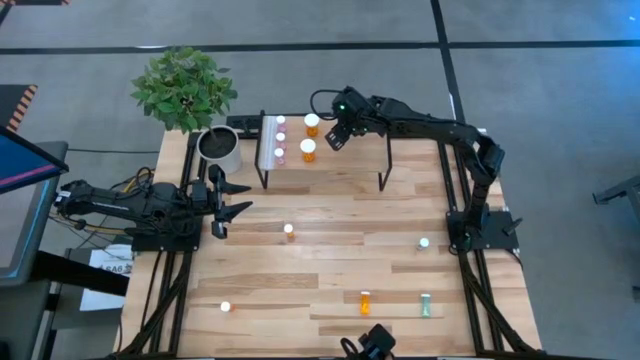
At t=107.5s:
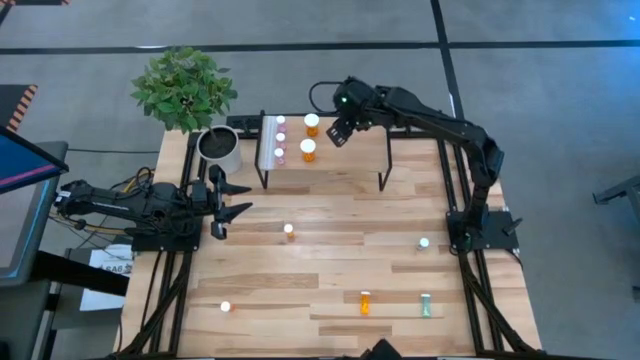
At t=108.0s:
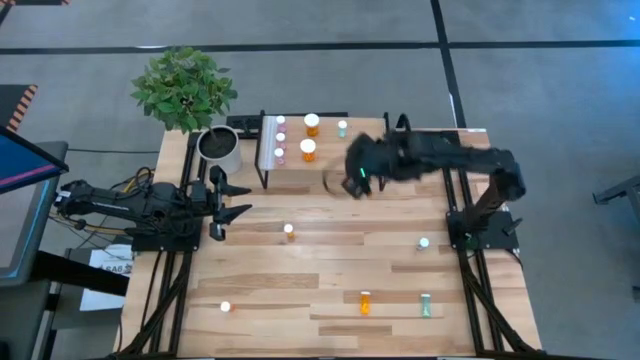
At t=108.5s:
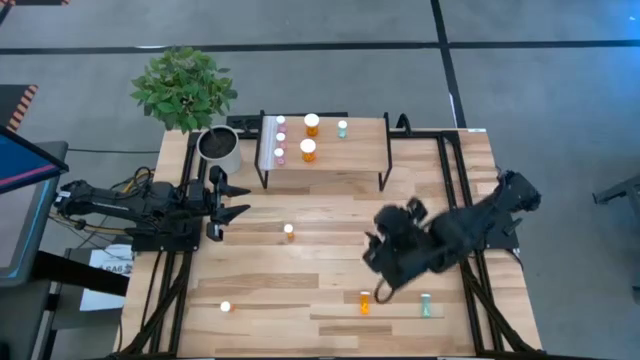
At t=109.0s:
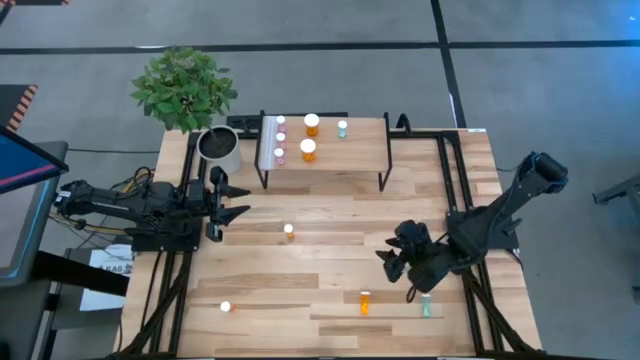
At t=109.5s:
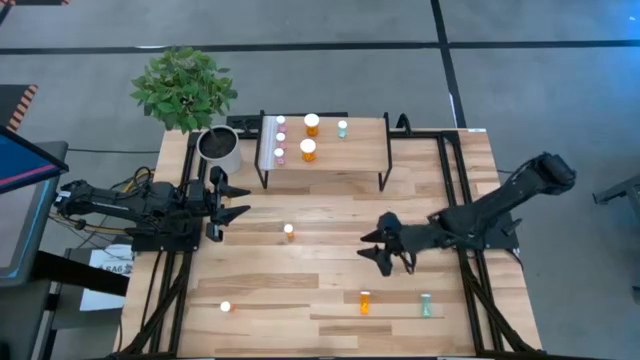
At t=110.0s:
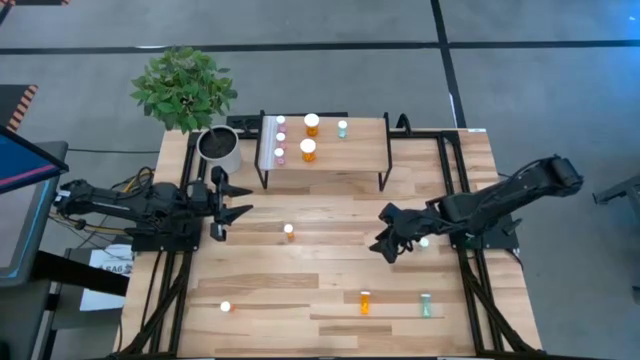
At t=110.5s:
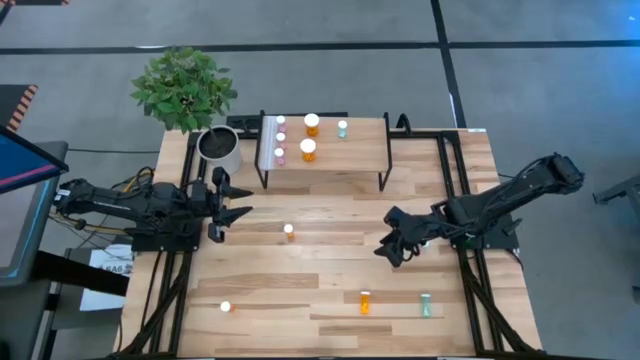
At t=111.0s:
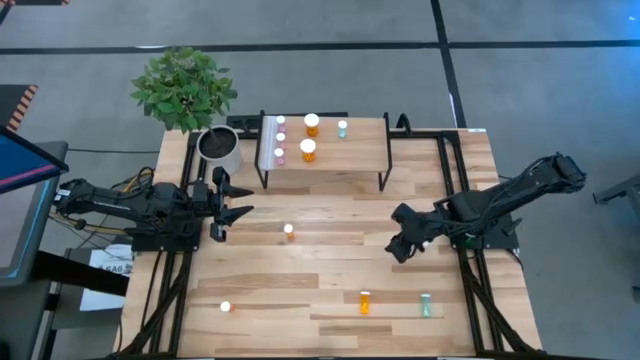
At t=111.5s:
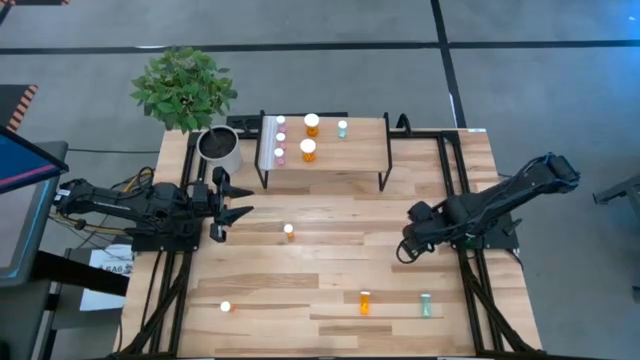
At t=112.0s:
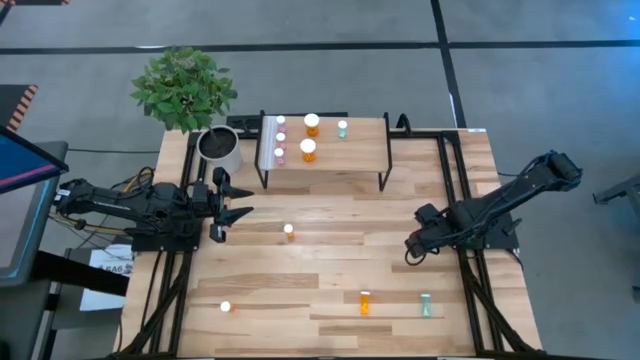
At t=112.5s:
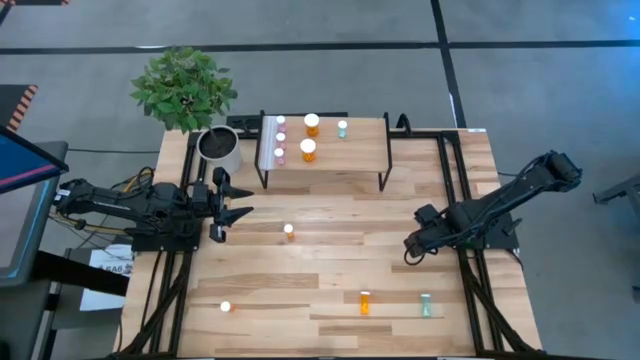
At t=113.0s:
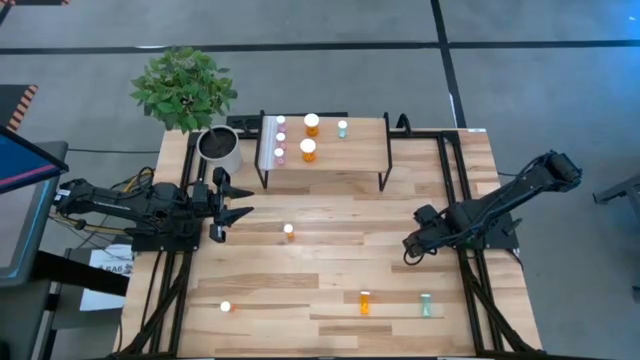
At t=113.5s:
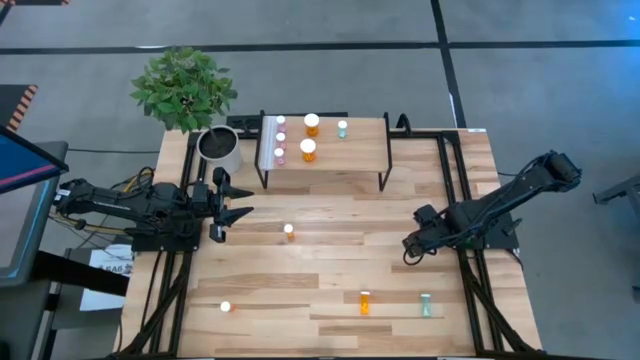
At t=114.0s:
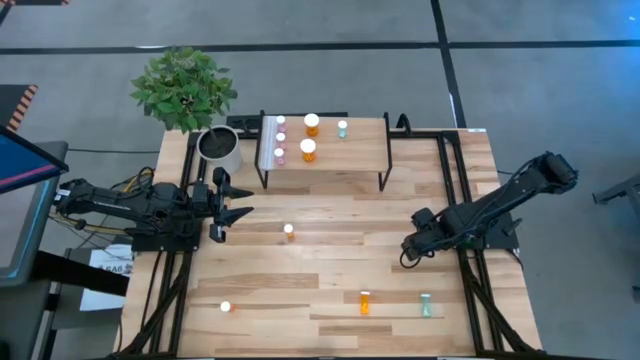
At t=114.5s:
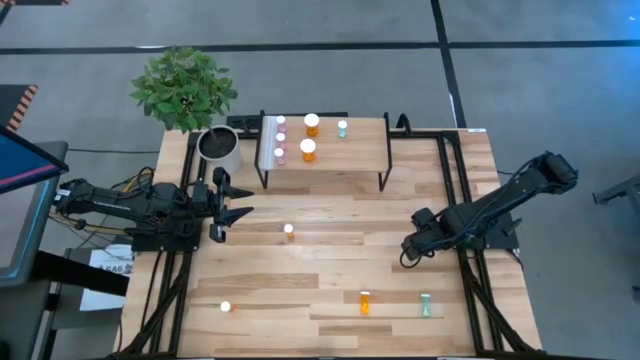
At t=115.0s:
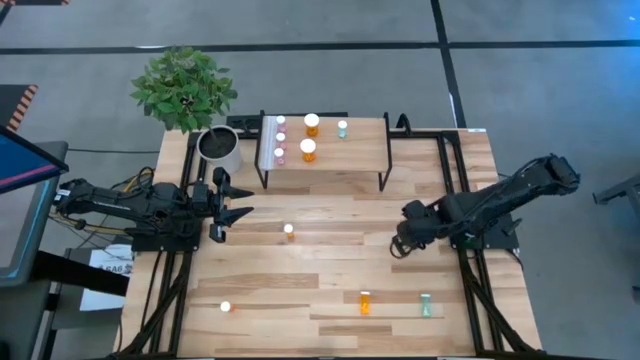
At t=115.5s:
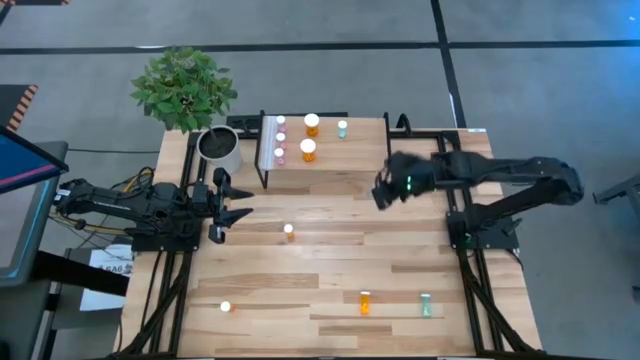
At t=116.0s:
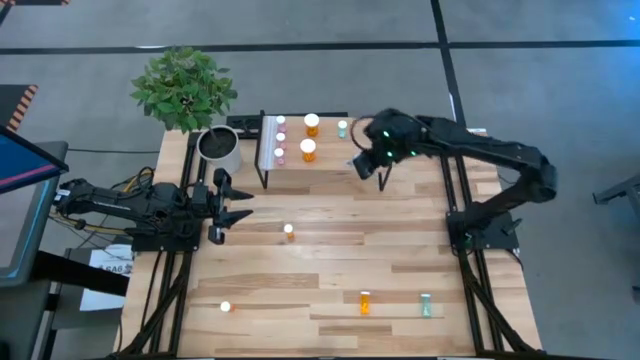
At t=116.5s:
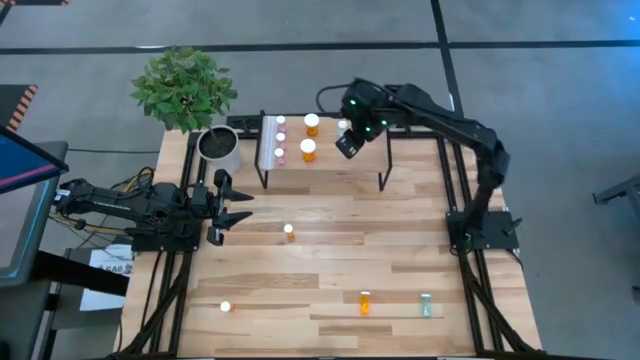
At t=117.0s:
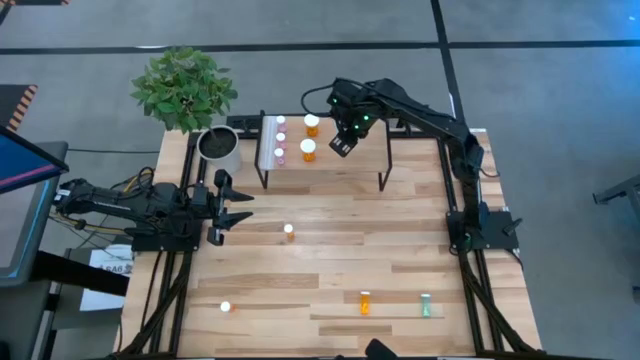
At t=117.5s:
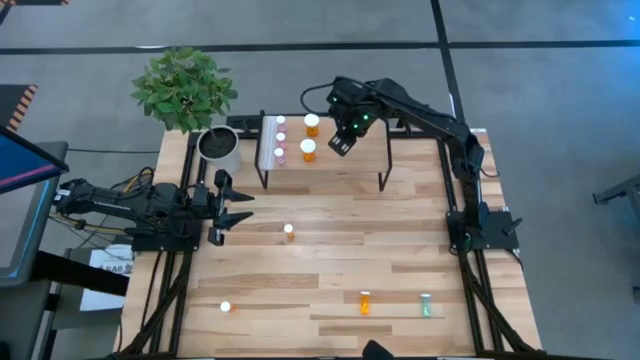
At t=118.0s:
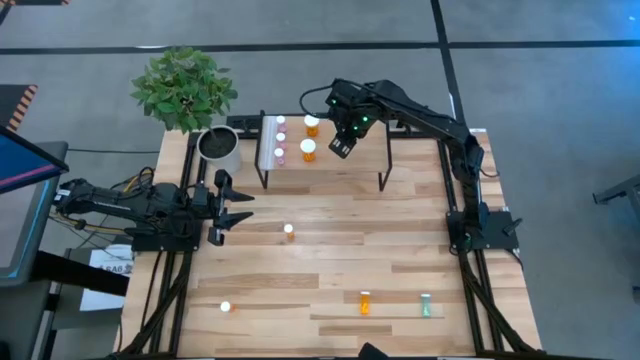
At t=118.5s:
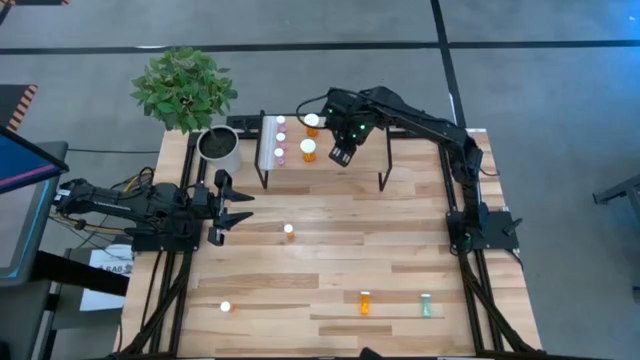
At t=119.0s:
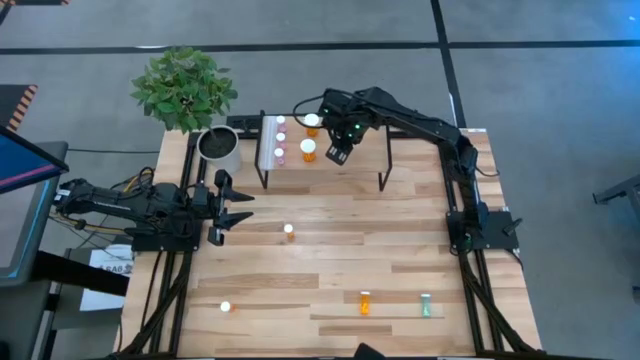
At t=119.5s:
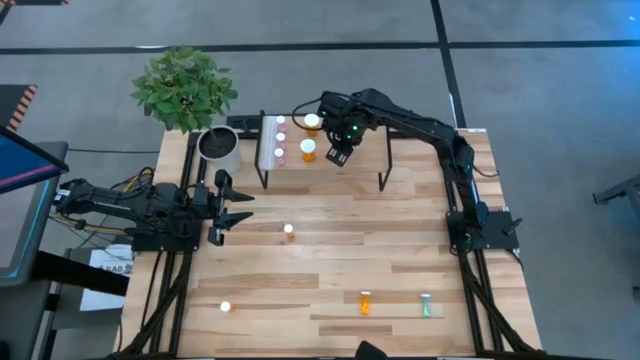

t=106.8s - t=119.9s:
Task: Pick and place medicine bottles onto shelf by color
Put the top green pill bottle on the shelf aligned with the other green pill bottle

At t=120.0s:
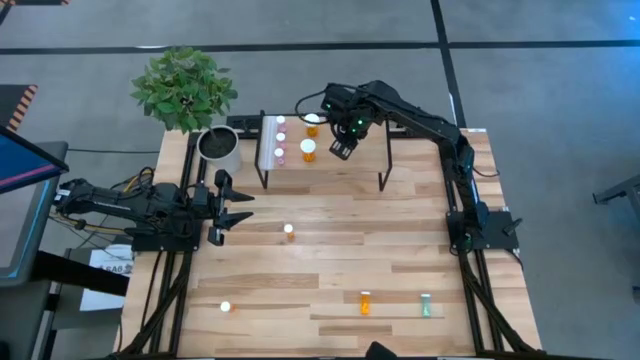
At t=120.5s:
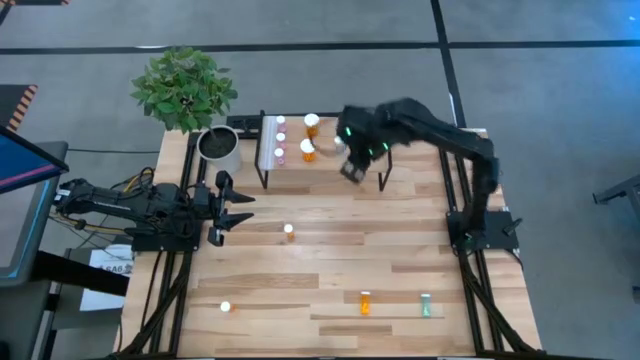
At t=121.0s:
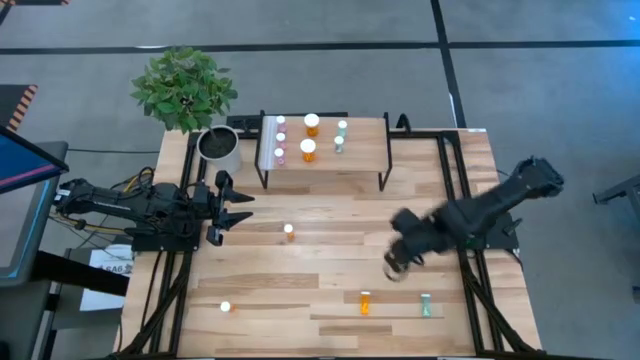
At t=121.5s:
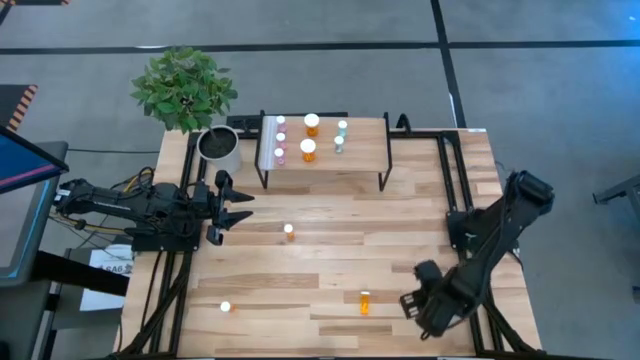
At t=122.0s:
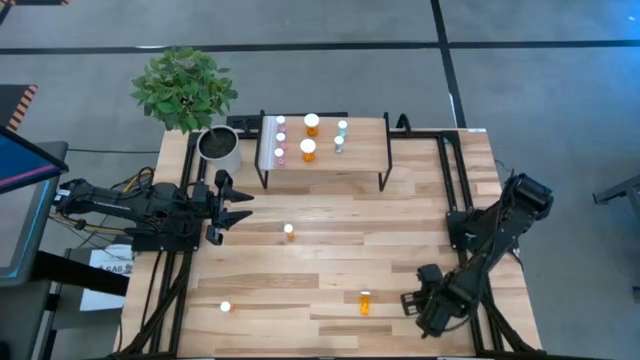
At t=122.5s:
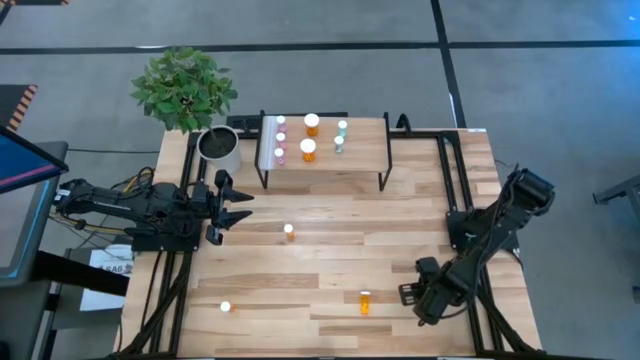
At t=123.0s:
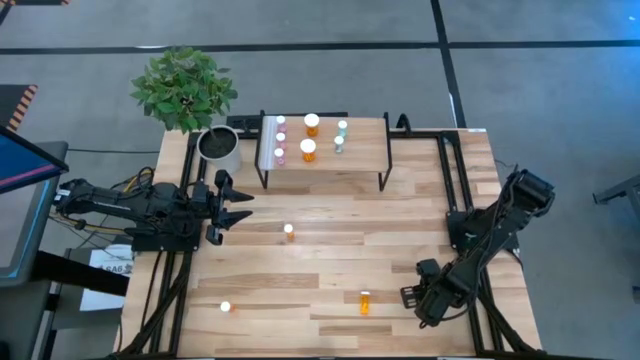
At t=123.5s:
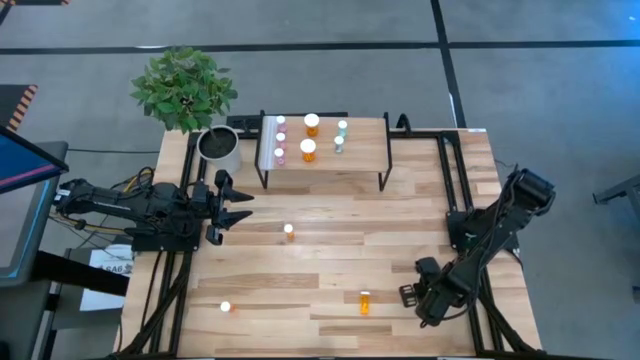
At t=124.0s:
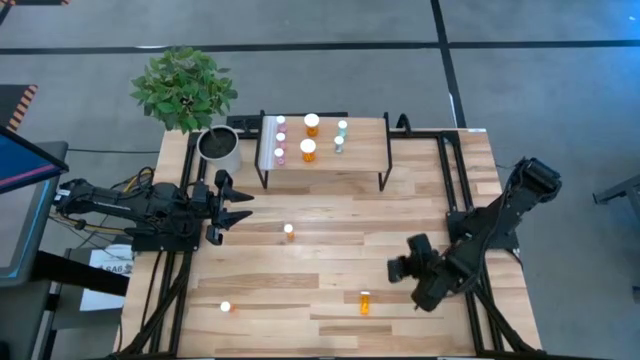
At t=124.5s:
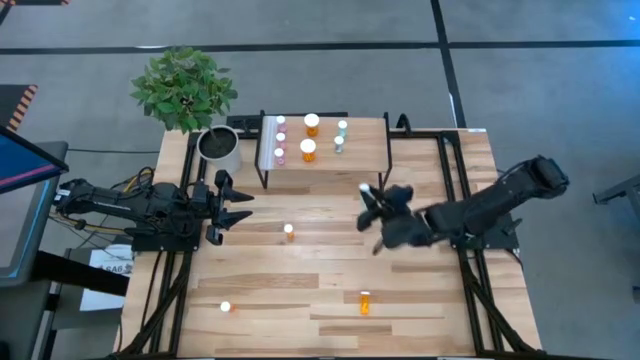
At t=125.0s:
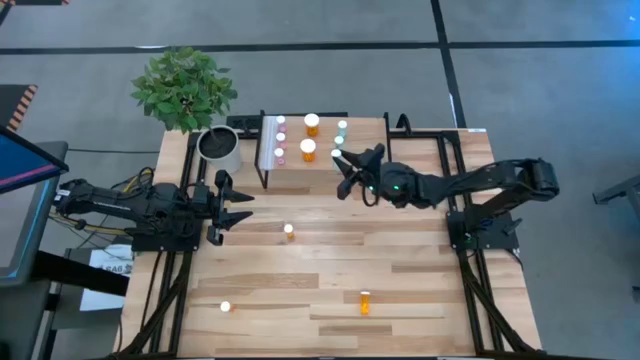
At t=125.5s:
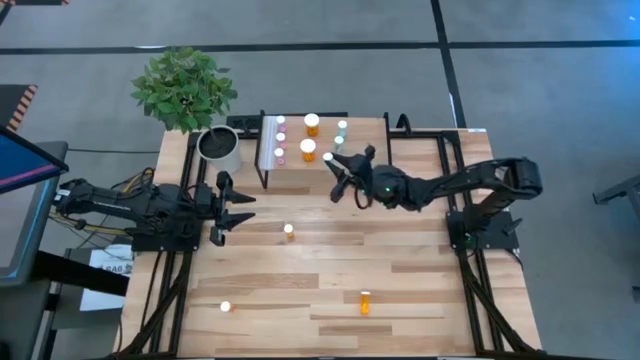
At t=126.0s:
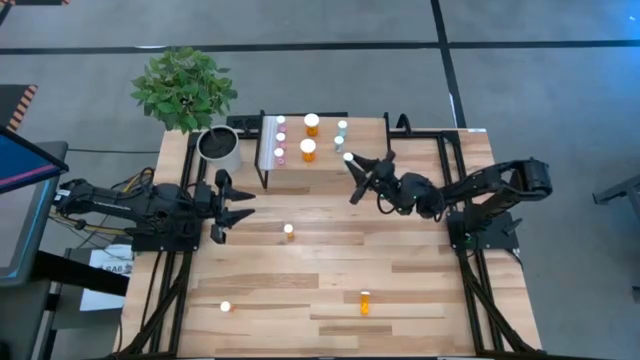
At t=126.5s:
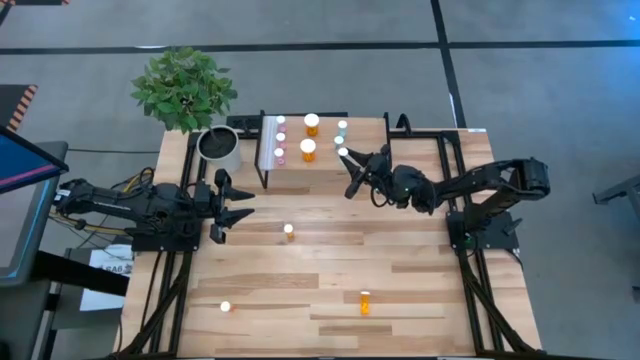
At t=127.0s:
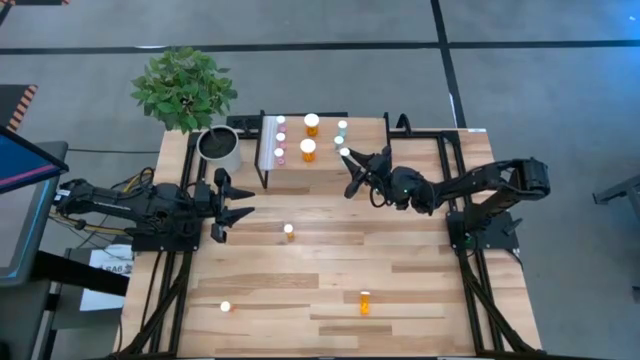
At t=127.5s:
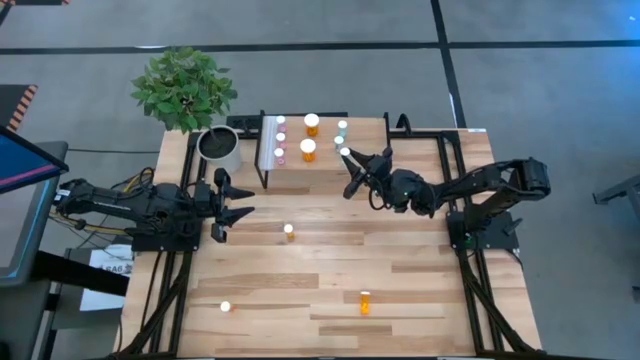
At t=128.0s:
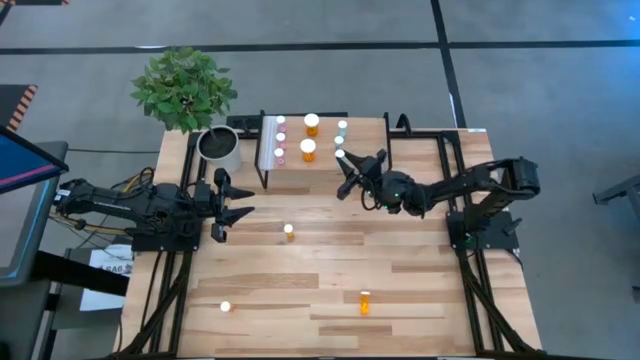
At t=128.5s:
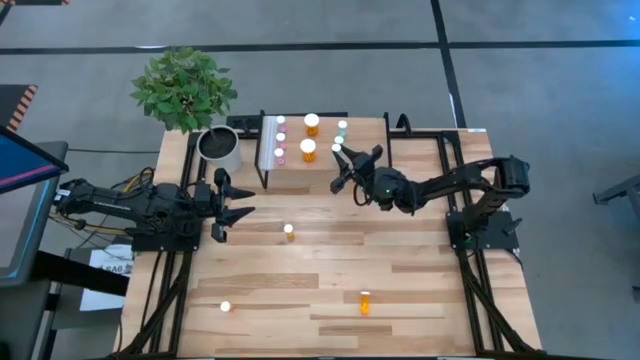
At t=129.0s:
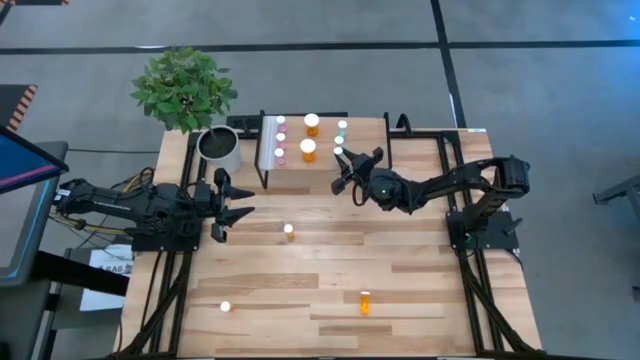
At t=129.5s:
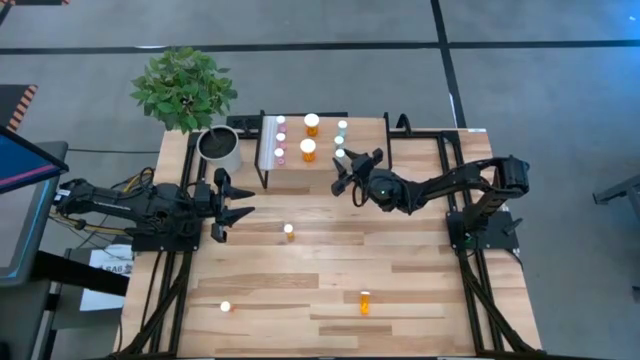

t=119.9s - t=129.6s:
Put the green pill bottle on the shelf aligned with the other green pill bottle
